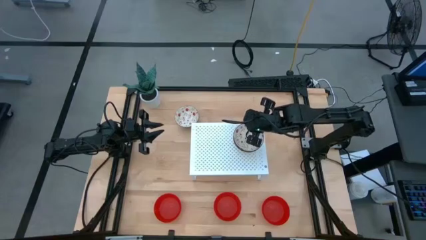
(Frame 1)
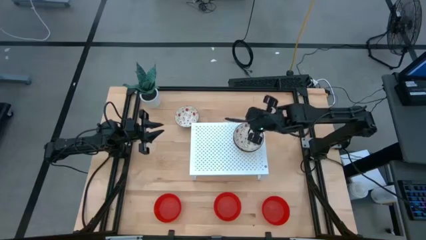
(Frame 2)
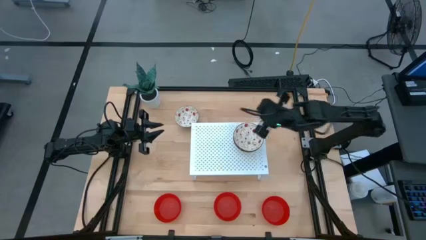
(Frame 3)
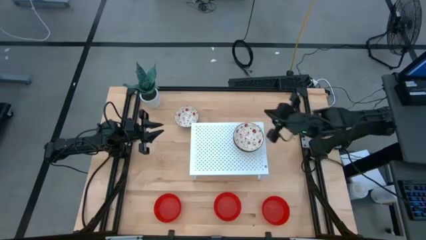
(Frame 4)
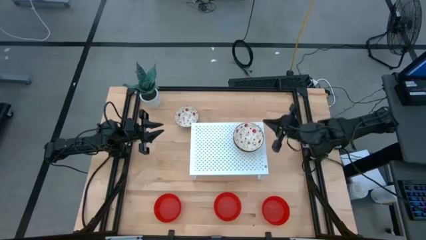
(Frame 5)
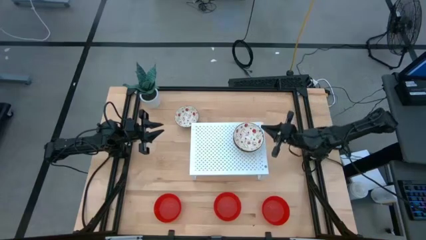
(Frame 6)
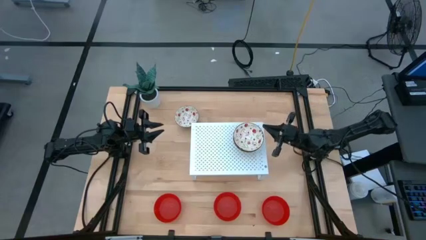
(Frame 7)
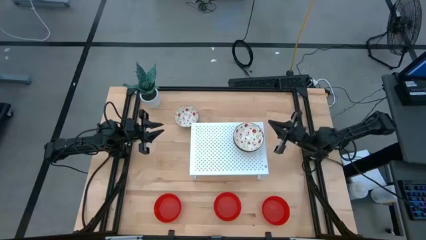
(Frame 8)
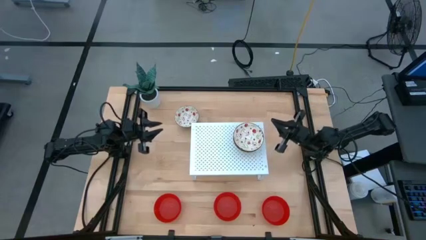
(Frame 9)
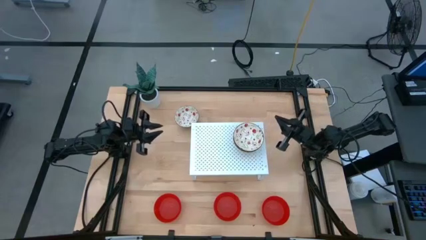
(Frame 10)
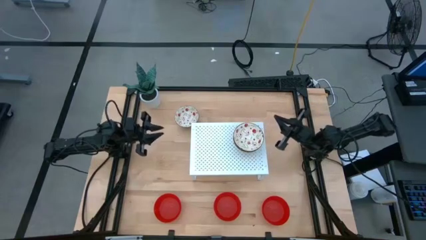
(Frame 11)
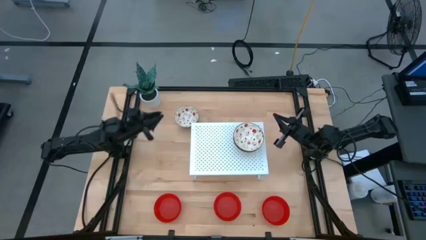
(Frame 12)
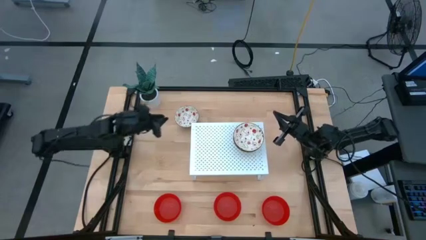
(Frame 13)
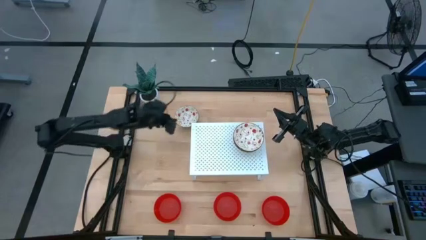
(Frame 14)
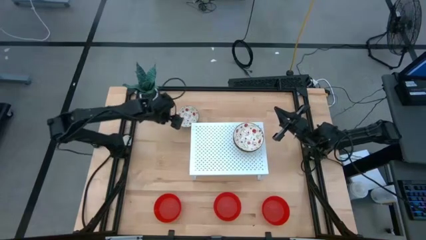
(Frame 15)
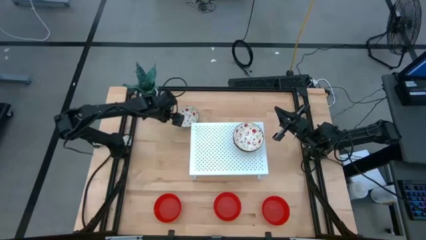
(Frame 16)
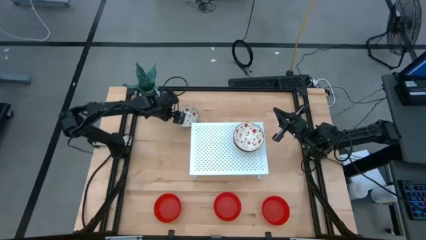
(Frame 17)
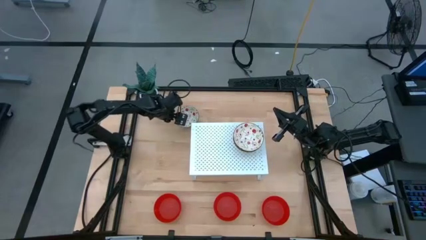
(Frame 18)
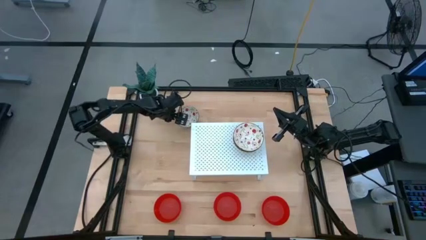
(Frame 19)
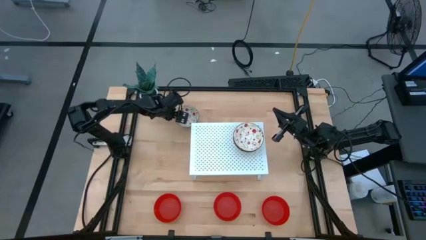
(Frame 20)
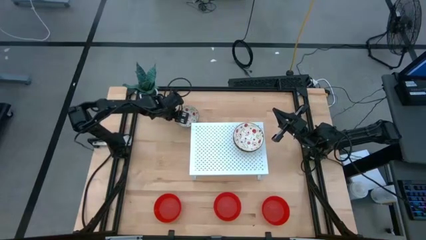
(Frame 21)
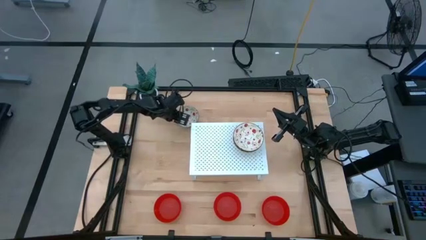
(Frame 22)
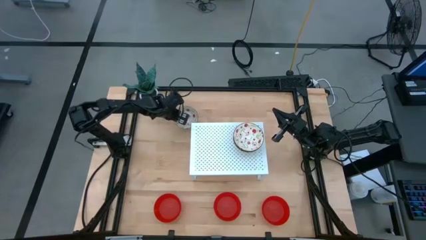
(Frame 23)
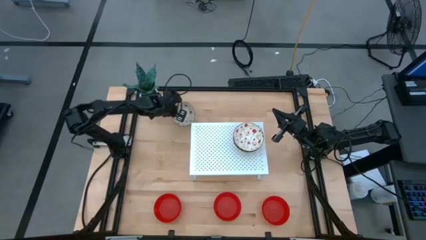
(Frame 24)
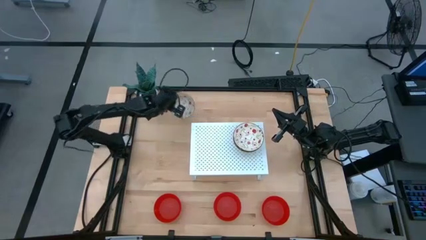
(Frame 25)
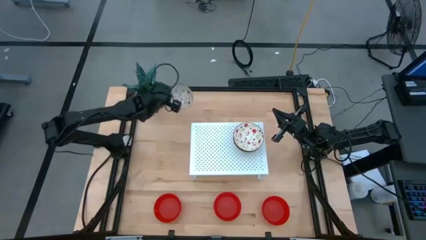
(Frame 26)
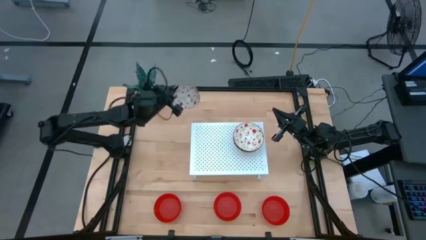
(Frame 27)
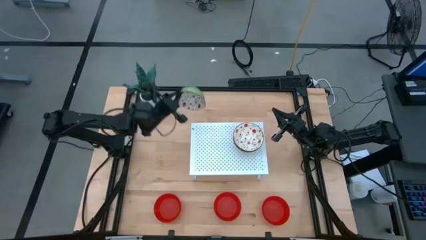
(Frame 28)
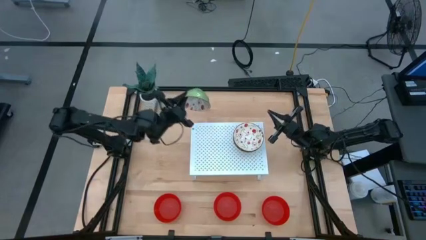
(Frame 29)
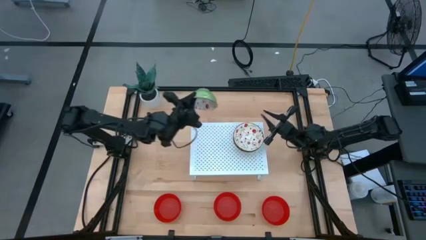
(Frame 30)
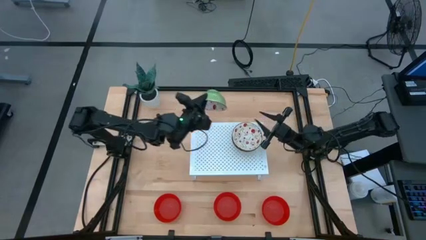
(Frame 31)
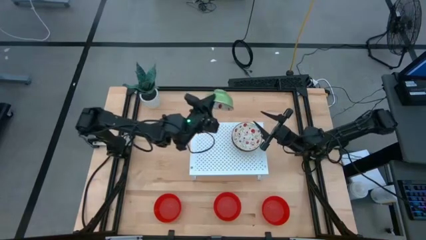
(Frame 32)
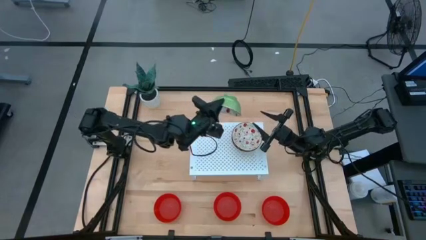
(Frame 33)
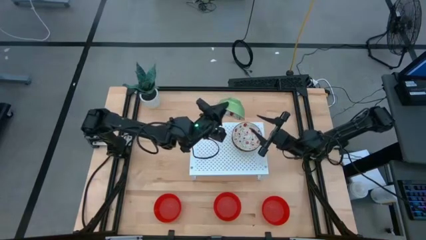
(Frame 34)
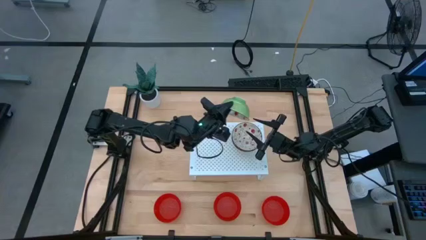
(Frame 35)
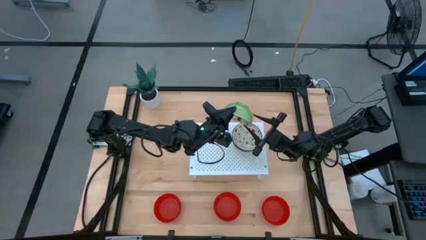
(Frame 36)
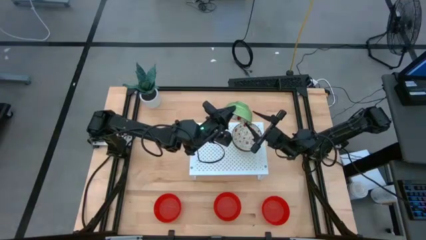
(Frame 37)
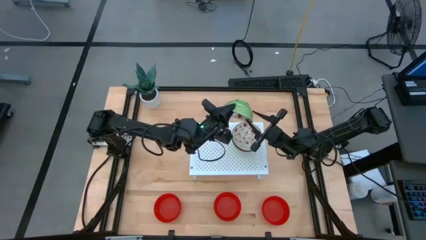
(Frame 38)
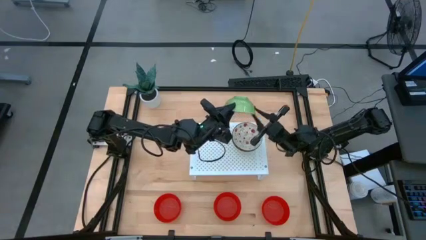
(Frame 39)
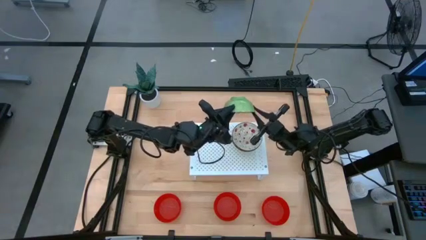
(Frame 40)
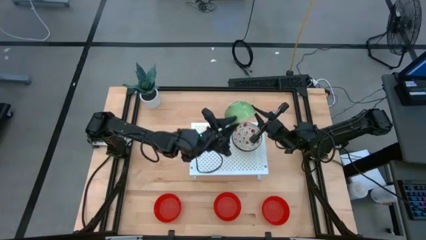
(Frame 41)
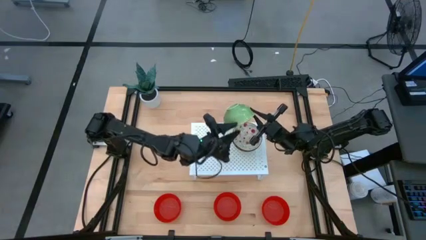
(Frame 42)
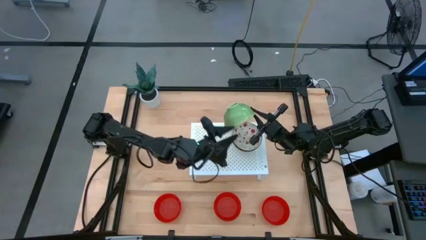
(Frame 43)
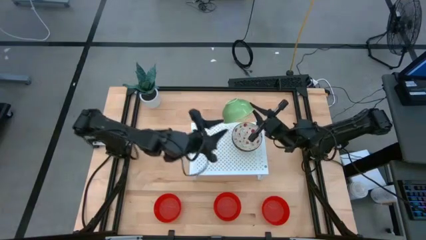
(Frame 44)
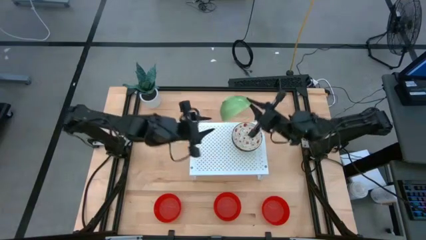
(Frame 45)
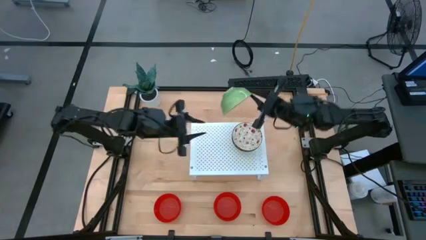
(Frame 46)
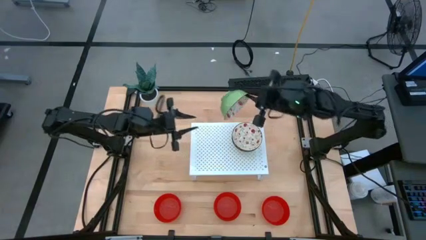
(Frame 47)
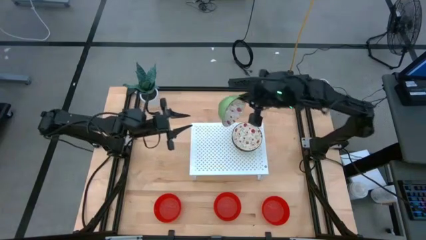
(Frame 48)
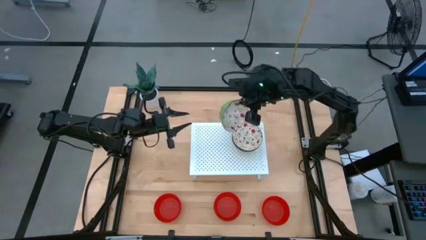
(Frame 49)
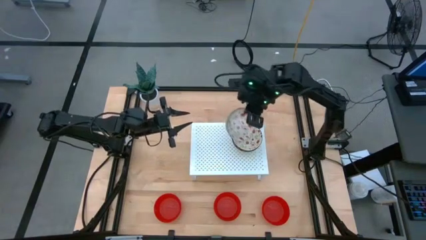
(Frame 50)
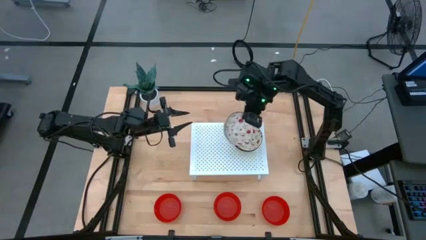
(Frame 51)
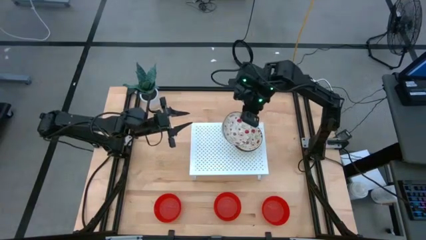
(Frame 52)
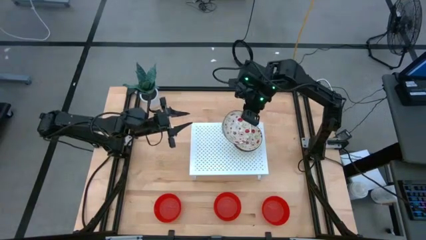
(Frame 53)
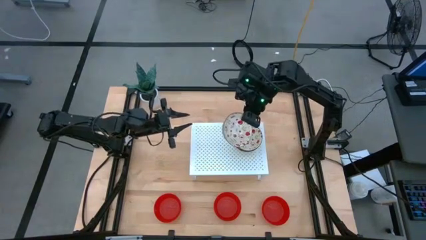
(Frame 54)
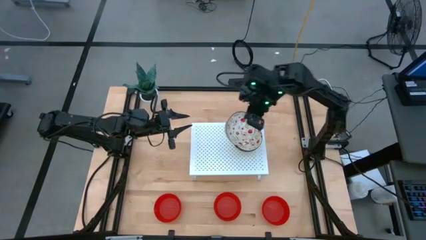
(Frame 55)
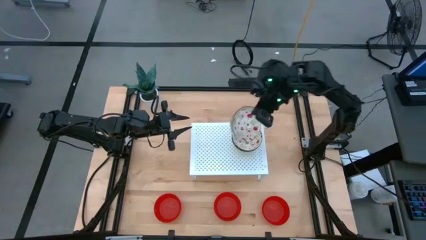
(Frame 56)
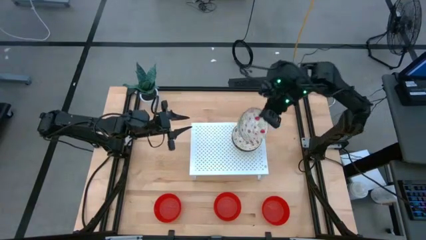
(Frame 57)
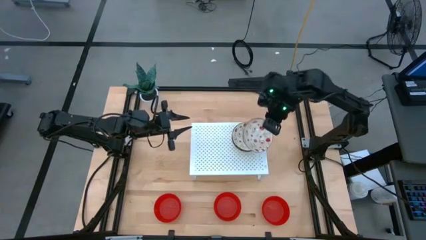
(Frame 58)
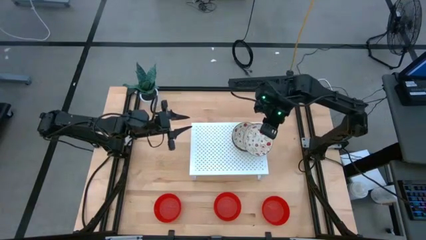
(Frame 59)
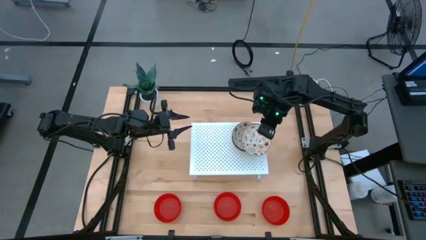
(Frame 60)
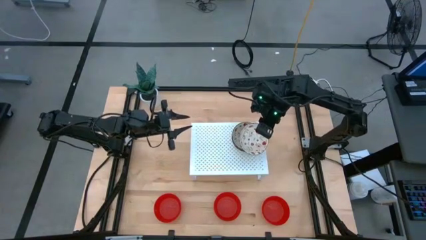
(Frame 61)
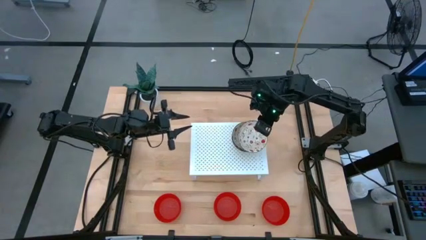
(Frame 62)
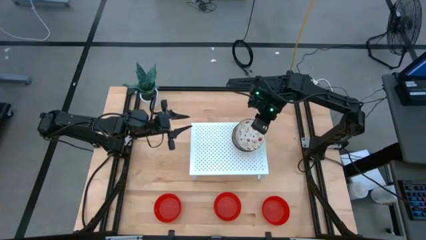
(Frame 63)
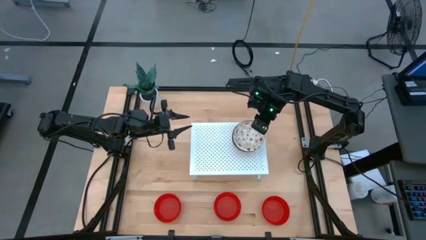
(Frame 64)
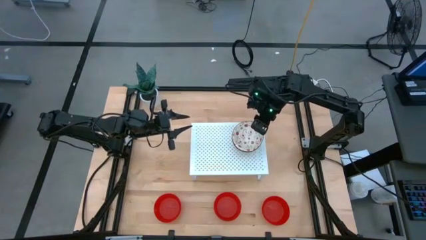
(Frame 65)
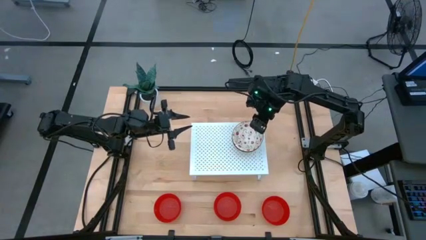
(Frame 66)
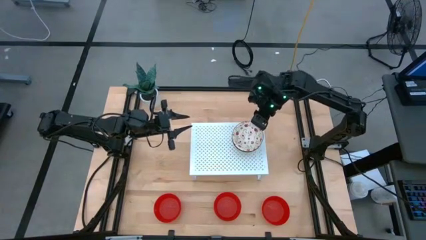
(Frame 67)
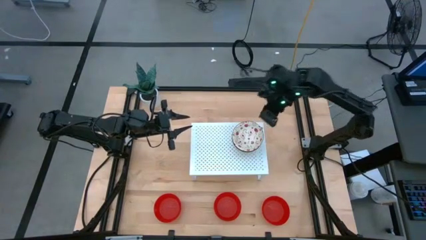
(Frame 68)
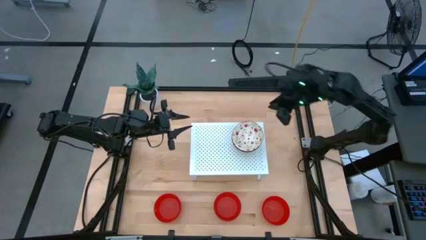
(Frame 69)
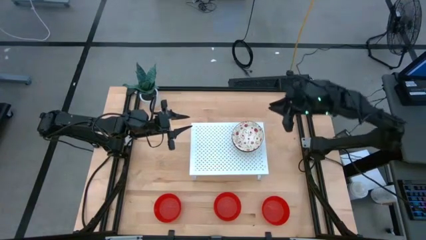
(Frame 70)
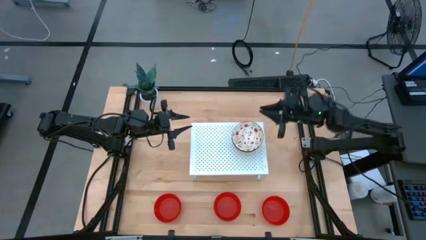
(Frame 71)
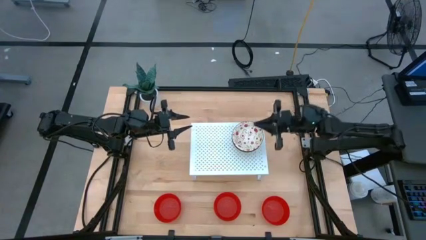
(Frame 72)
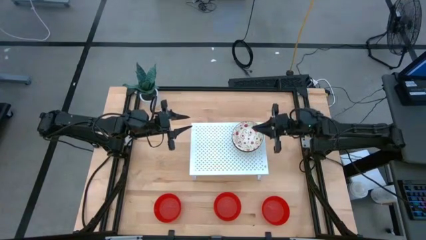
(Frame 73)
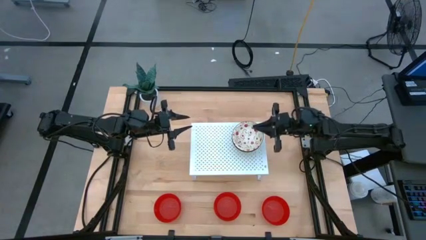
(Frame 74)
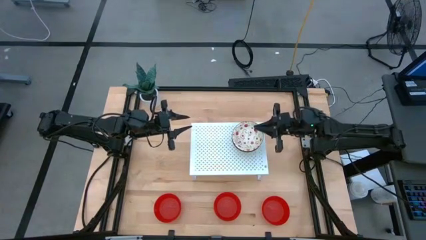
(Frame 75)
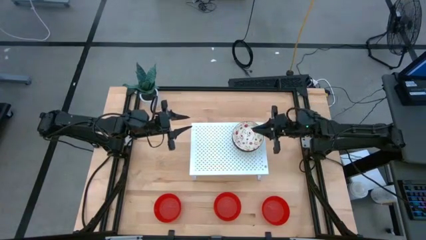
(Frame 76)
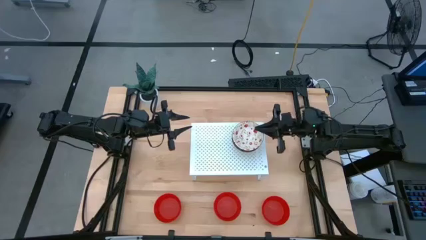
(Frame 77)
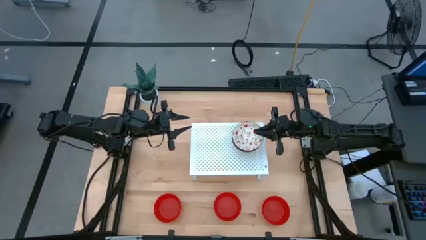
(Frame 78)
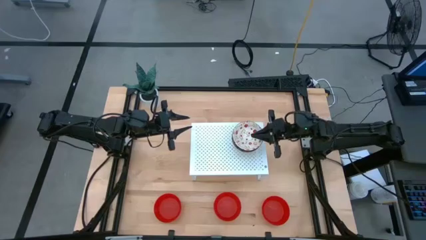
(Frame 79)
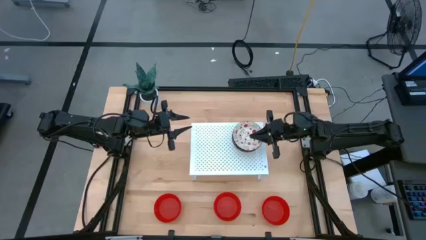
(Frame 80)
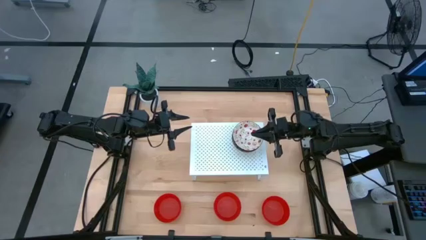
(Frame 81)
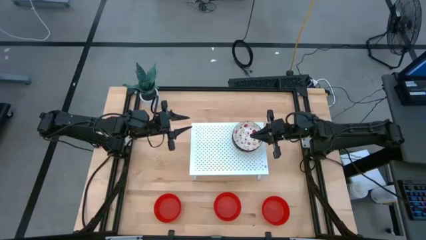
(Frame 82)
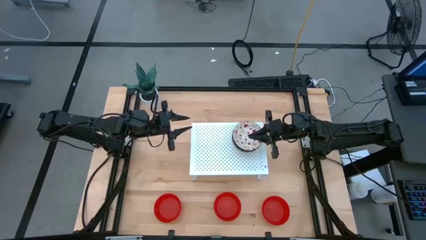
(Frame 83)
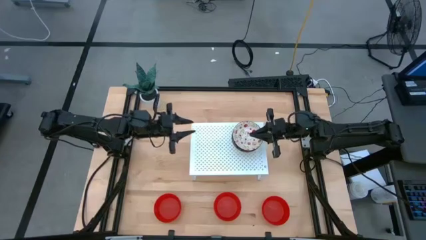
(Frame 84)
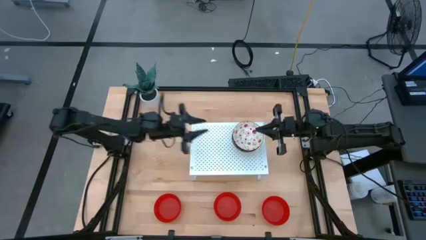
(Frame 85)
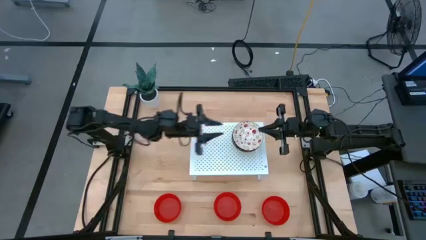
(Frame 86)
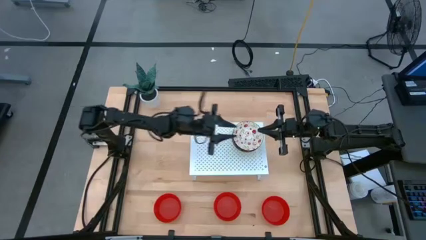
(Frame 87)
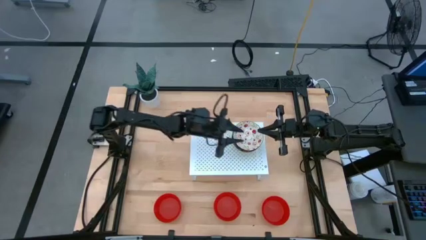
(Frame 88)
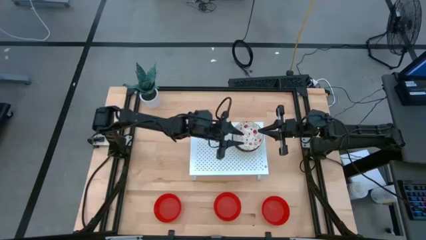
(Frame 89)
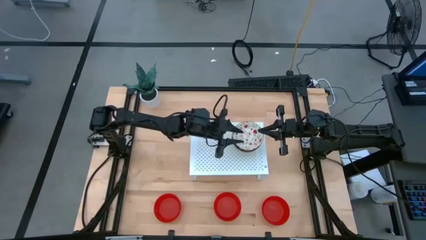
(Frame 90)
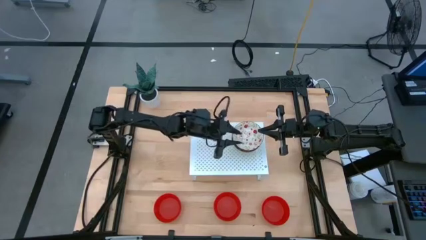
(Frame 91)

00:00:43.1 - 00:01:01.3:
Task: Pick & Place Mini bowls
Stack the white patterned bowl on top of the stacked white patterned bowls on the shelf
